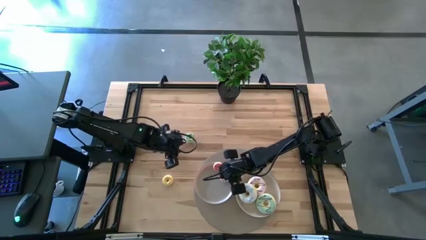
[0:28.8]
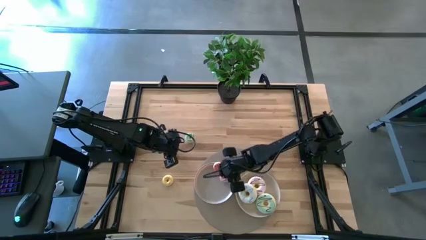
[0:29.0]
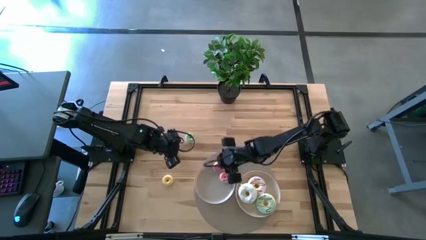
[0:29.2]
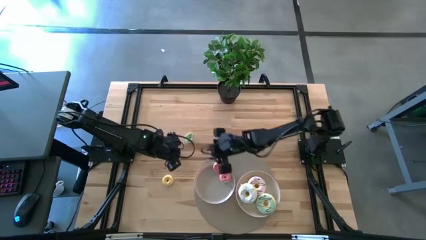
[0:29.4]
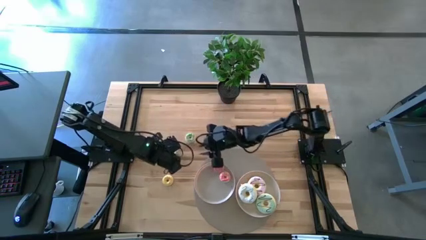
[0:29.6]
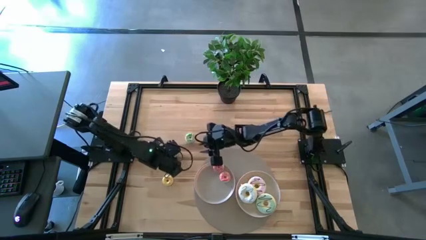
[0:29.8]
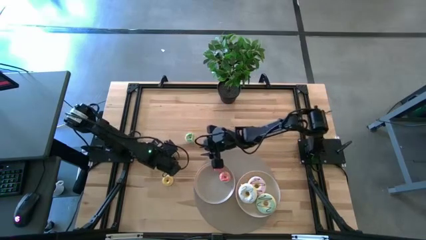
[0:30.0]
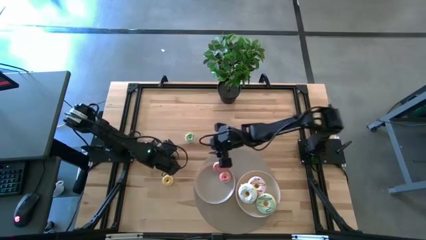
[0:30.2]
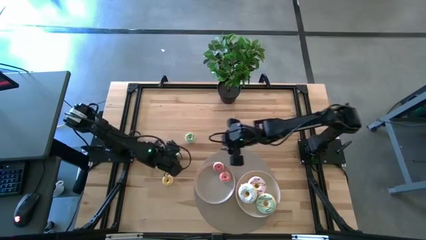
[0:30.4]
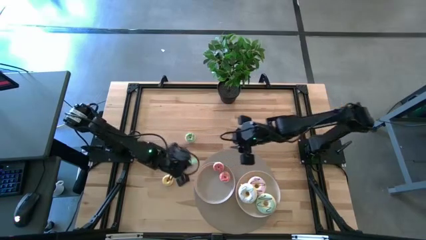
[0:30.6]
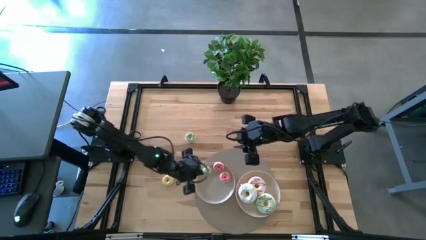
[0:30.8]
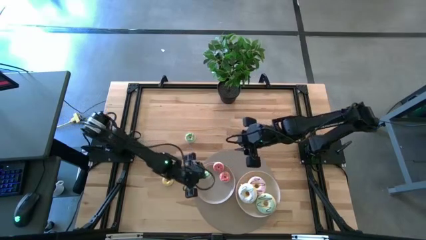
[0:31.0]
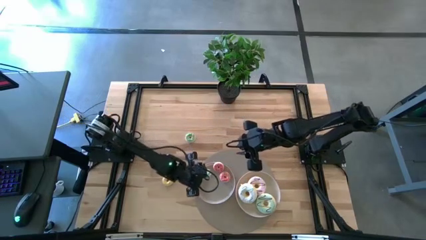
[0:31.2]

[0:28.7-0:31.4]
Task: Pick & Place donuts
Put the bottom left small green donut into the left grey plate

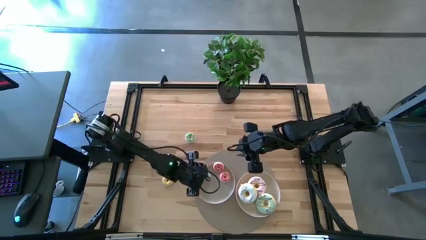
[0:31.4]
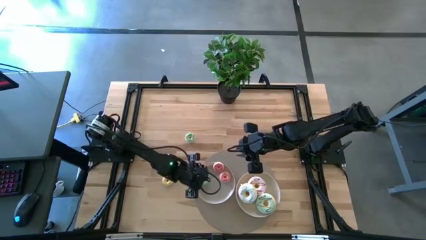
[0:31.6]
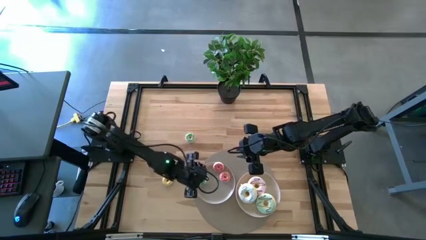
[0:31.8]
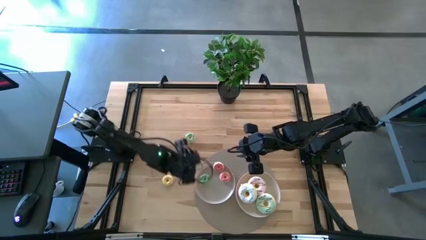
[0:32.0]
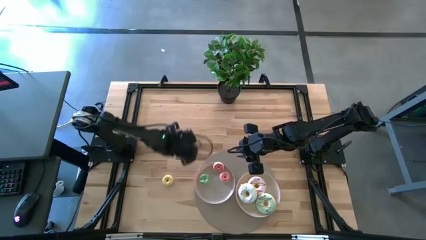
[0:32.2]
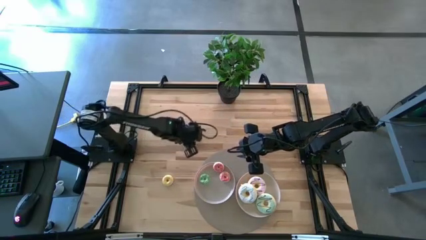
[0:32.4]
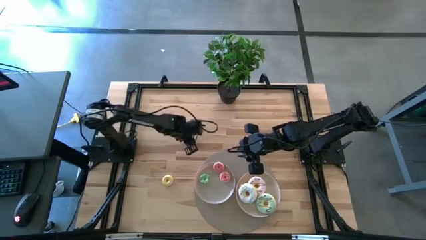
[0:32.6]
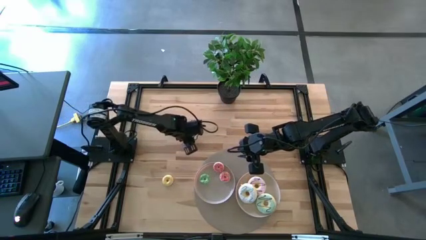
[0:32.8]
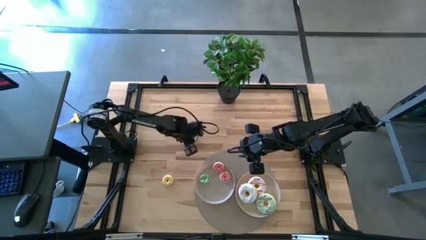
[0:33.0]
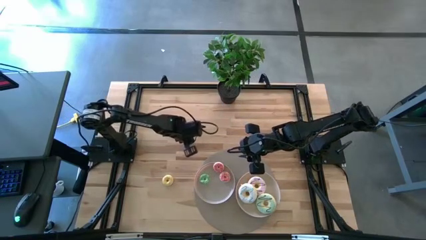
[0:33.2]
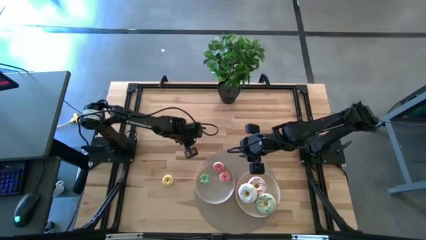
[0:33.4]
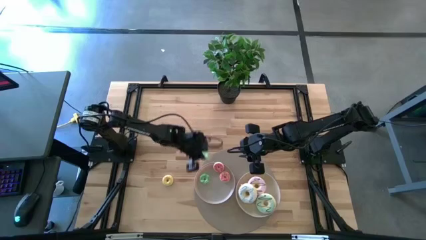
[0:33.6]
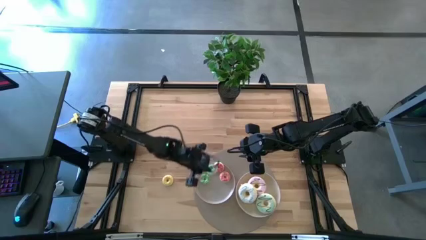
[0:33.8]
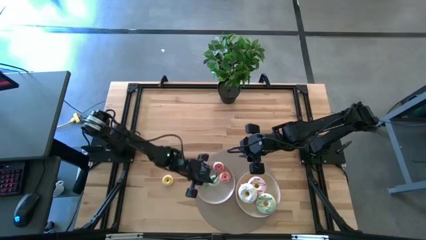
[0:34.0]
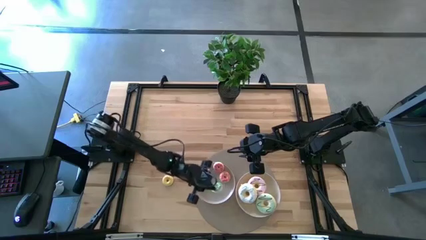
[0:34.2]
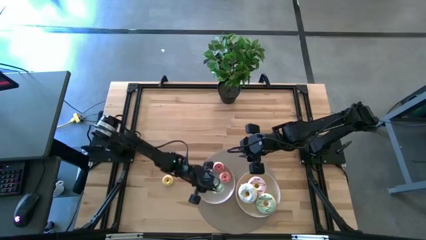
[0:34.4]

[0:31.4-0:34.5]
Put the small green donut into the left grey plate

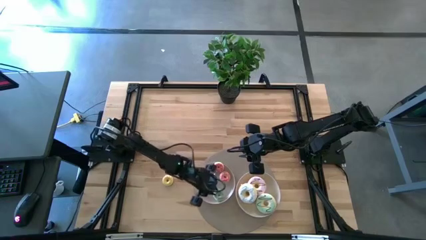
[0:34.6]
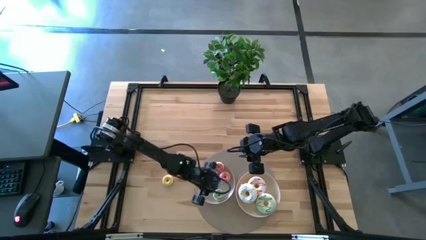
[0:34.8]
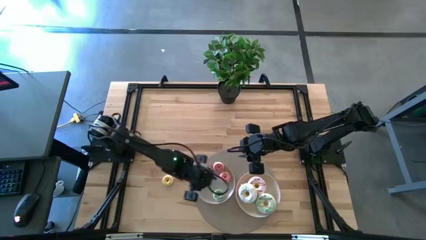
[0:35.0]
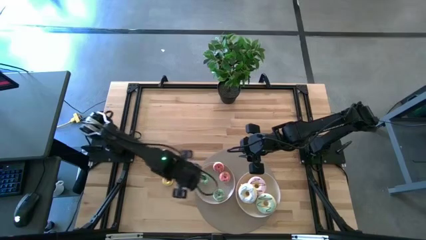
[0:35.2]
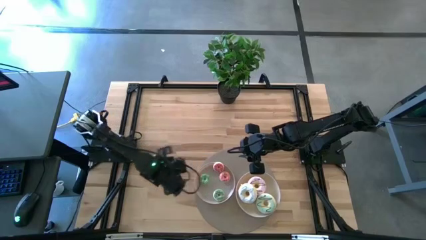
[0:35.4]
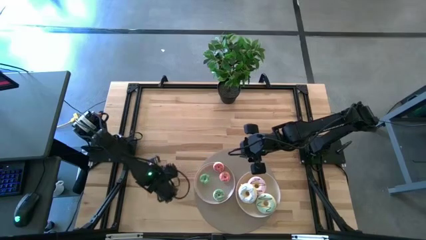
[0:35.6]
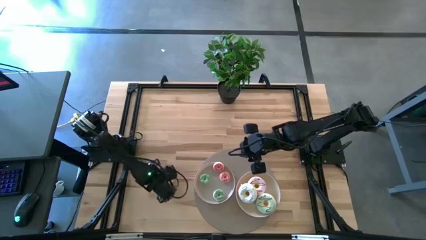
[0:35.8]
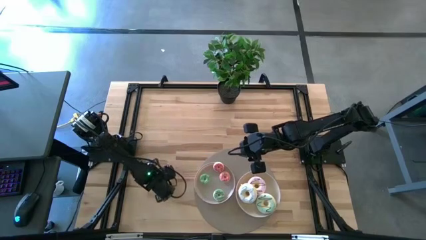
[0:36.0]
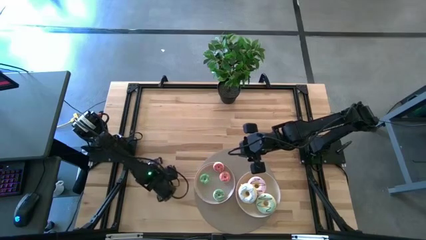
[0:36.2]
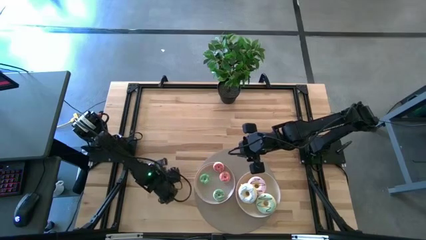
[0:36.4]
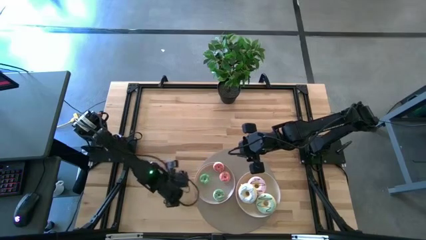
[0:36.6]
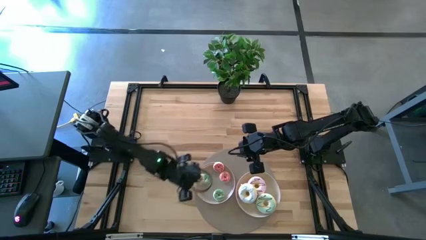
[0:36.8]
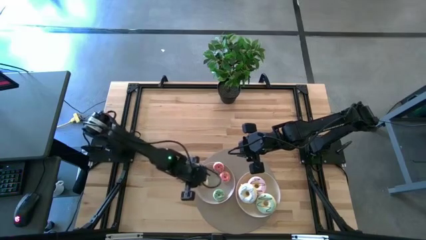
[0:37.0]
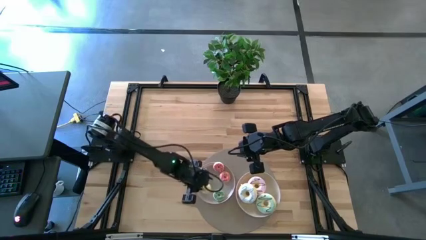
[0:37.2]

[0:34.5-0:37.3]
Put the right small yellow donut into the left grey plate

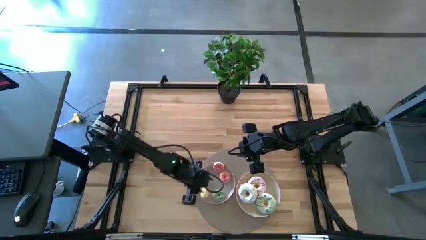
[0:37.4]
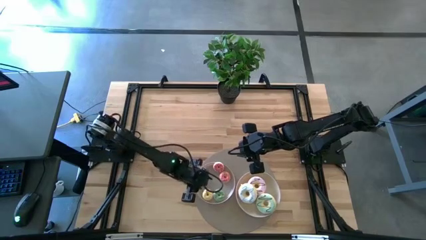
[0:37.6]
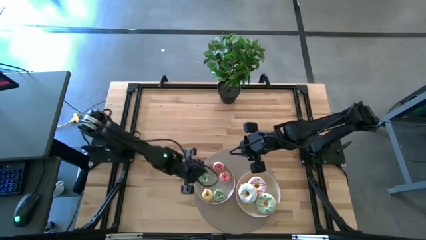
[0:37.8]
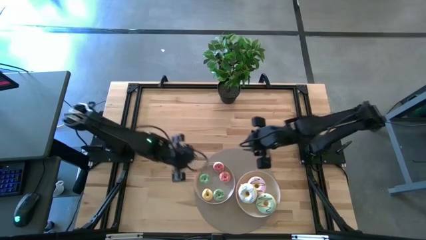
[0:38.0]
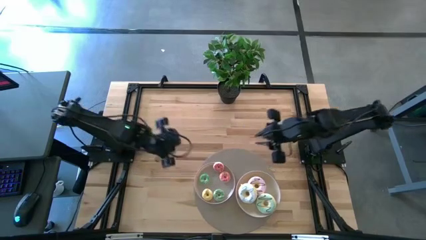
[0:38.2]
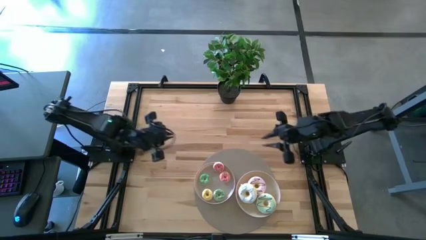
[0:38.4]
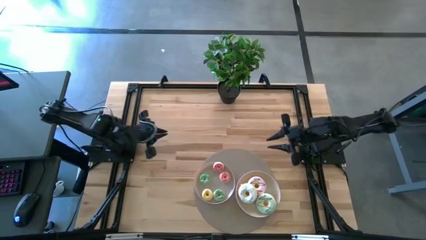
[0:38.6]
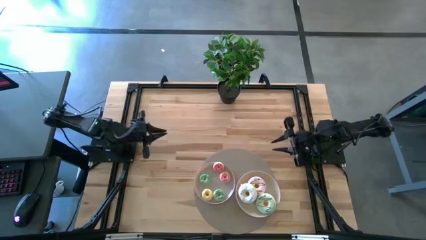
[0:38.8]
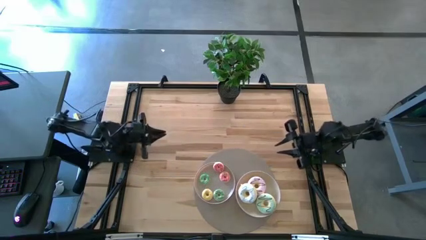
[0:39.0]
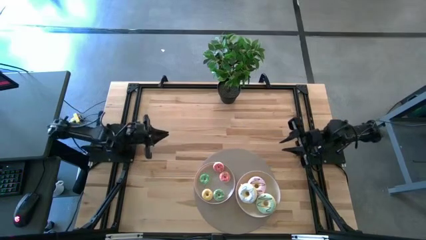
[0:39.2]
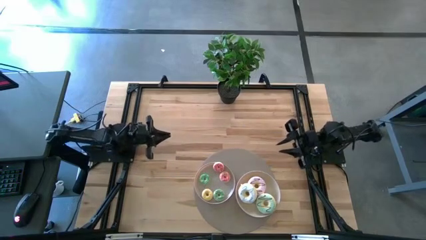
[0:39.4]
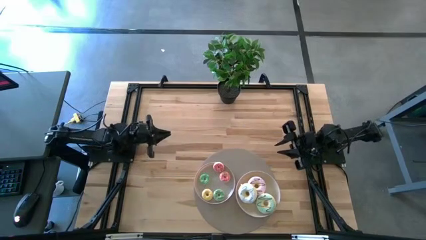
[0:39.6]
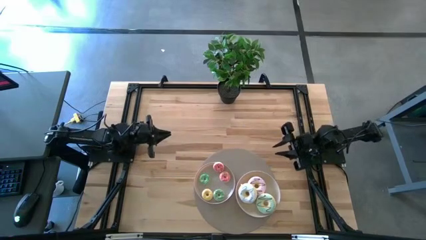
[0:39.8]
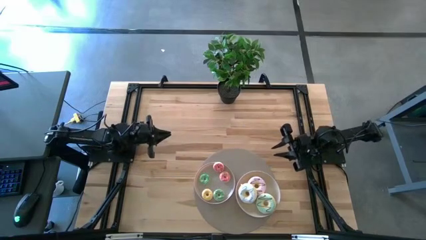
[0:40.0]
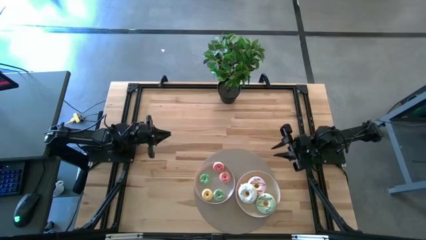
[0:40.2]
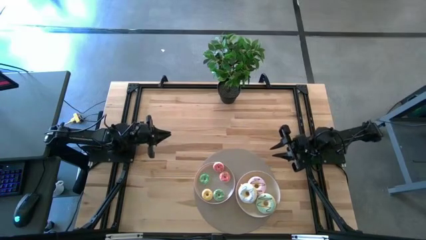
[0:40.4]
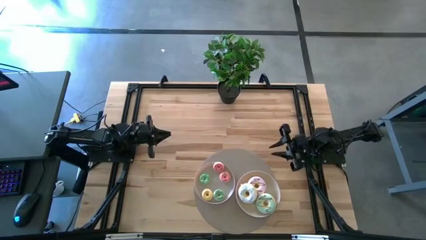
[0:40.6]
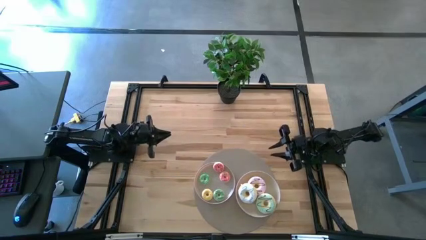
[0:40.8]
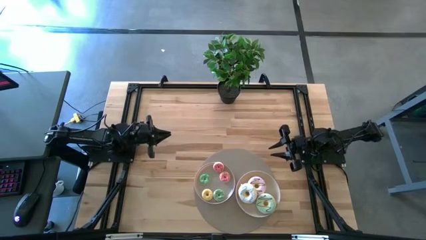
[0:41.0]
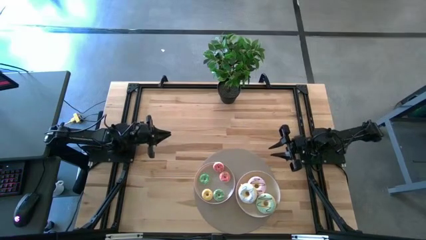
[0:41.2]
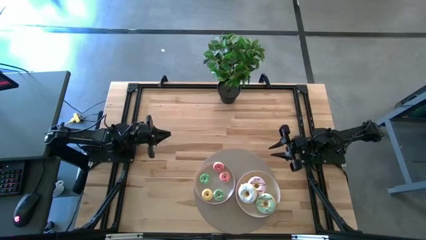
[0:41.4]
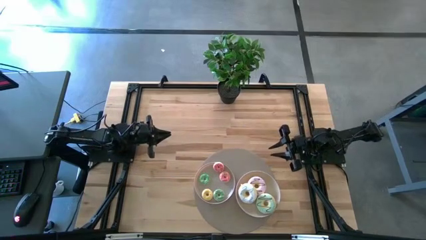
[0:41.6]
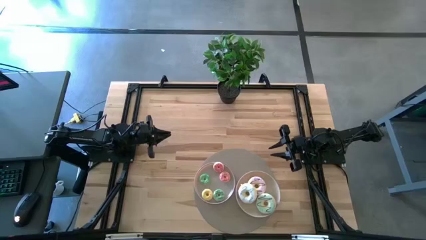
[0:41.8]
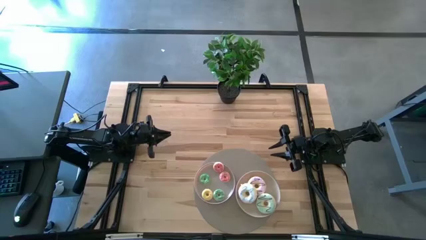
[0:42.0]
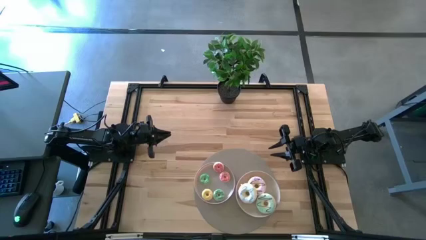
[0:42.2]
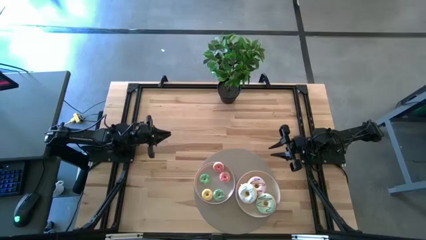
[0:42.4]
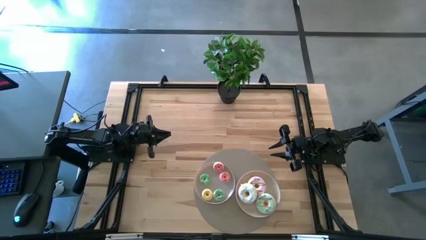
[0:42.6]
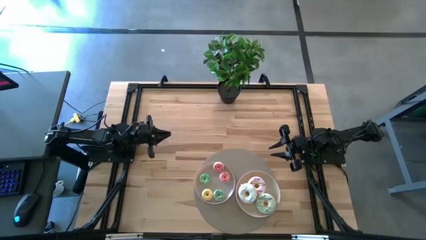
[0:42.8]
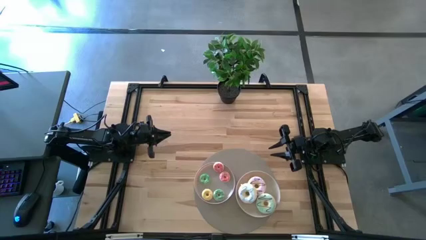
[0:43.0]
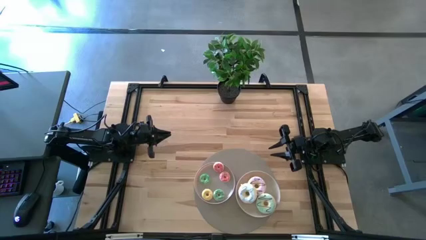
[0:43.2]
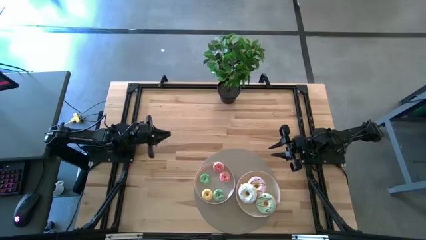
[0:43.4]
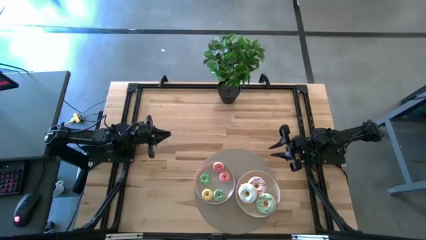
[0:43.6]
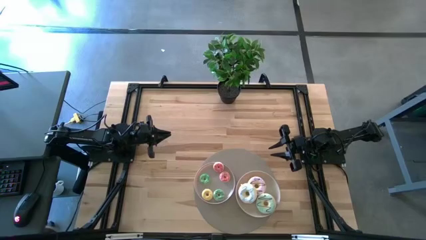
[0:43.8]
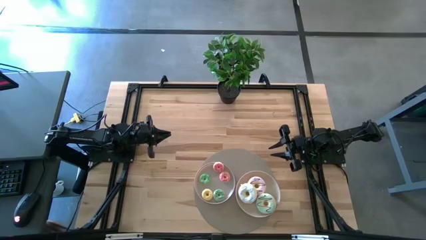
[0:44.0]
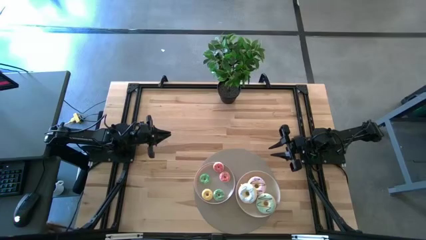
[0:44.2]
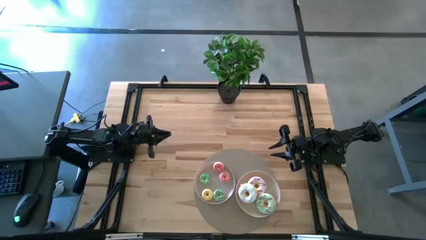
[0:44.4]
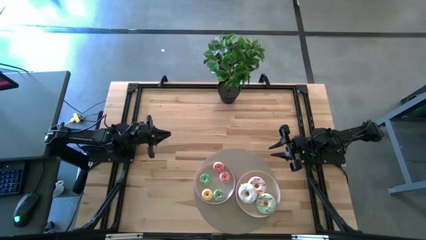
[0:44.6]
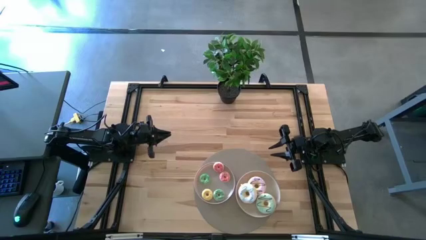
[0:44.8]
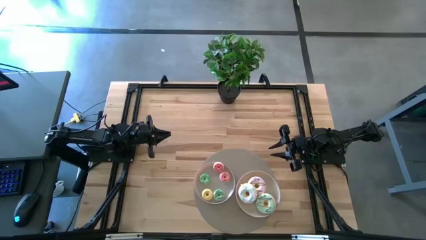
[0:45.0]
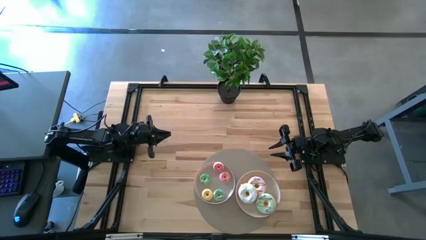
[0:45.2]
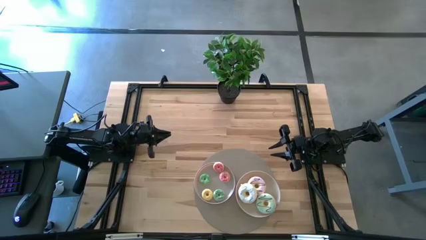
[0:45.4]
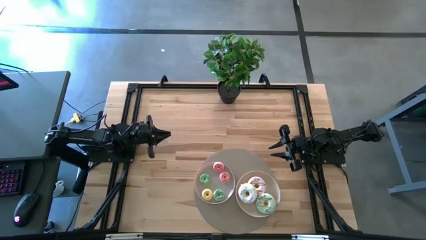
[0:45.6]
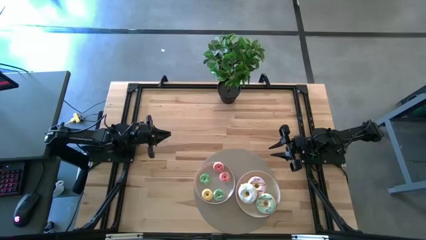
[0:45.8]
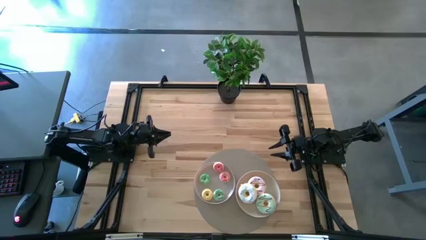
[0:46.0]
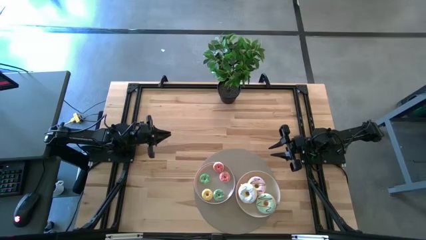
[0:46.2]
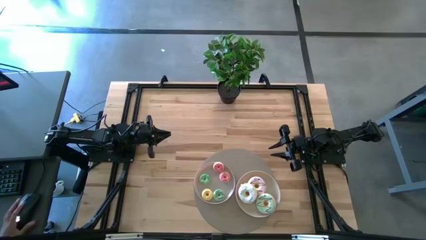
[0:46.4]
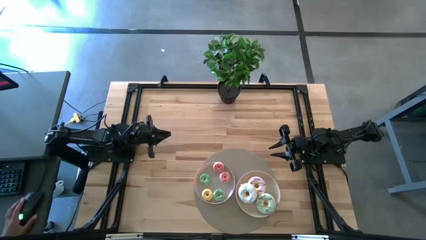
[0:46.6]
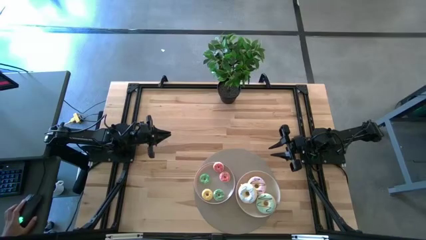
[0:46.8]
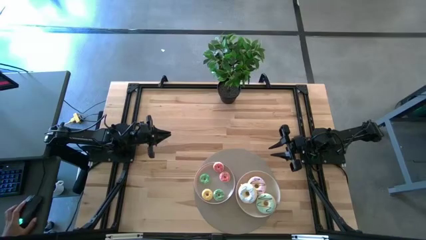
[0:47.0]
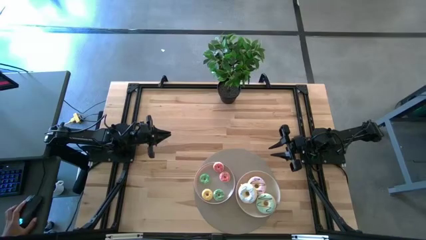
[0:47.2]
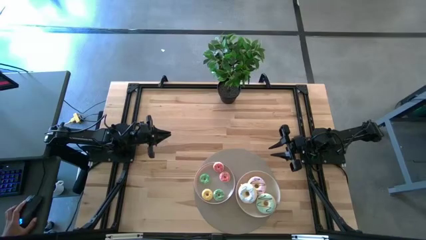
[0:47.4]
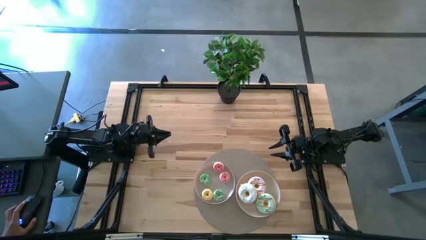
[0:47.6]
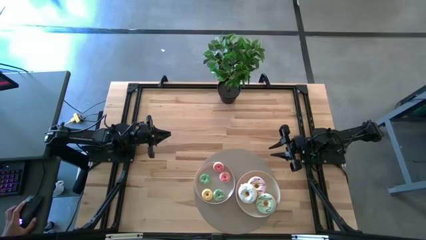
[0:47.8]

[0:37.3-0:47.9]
Return to Home Position
